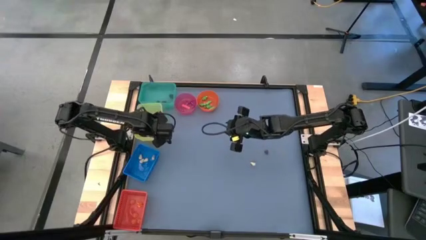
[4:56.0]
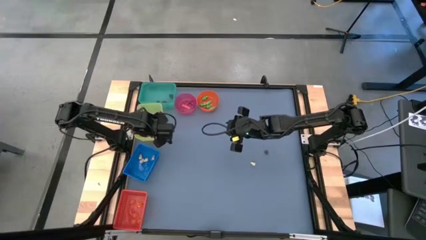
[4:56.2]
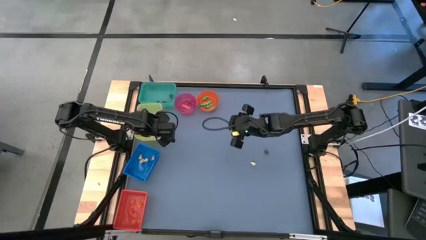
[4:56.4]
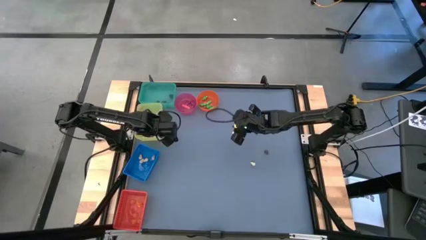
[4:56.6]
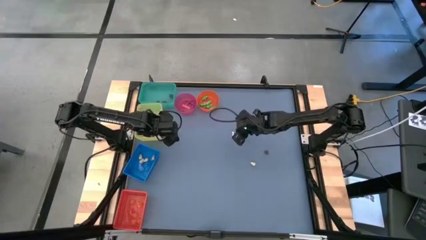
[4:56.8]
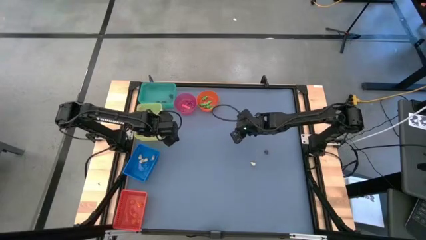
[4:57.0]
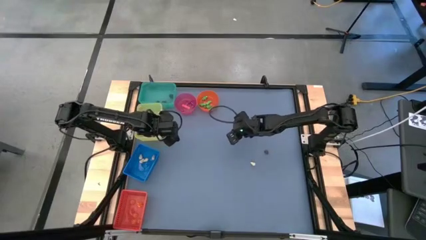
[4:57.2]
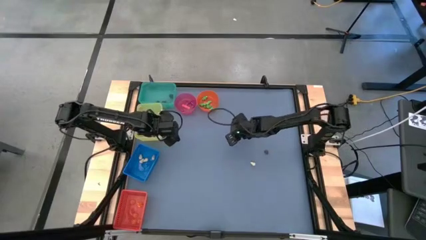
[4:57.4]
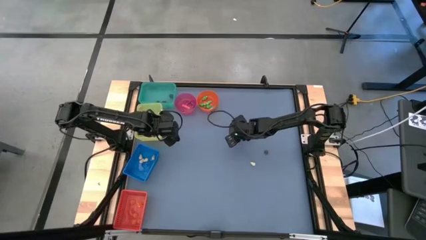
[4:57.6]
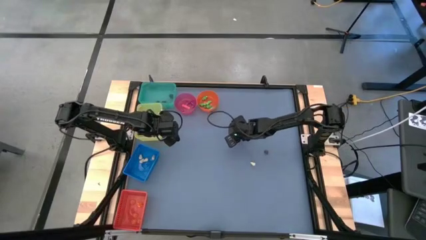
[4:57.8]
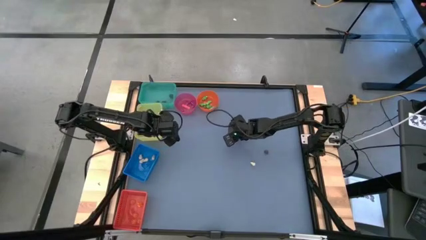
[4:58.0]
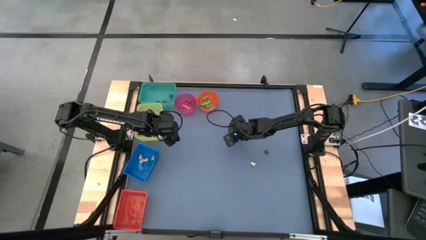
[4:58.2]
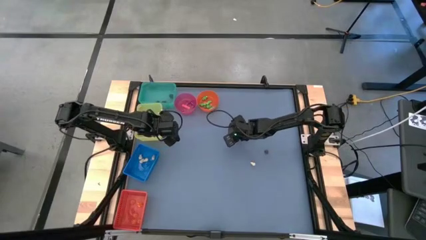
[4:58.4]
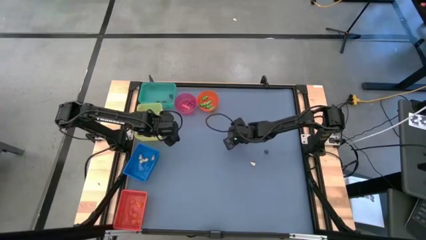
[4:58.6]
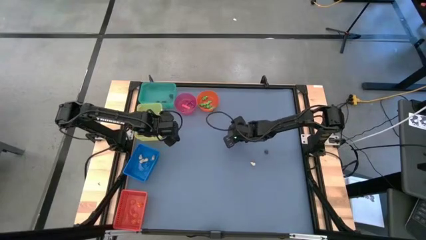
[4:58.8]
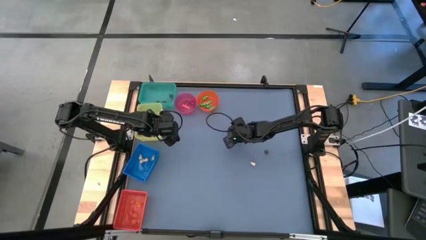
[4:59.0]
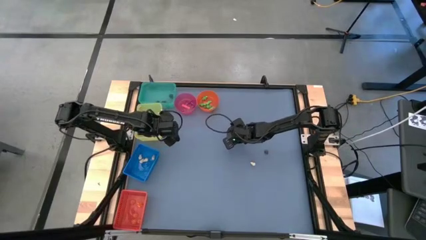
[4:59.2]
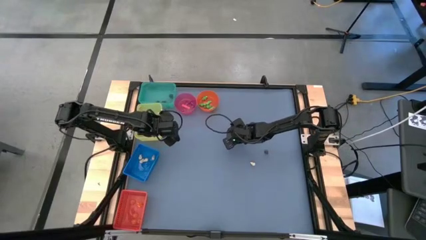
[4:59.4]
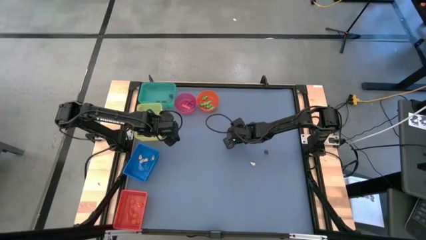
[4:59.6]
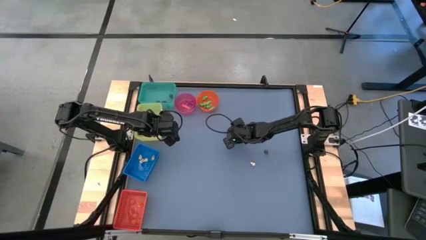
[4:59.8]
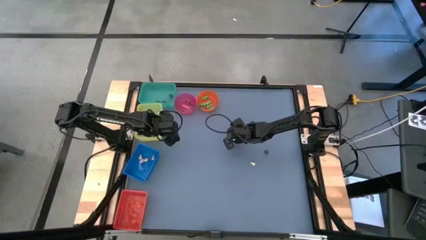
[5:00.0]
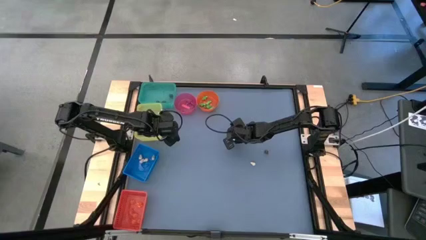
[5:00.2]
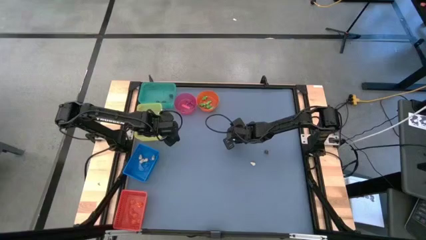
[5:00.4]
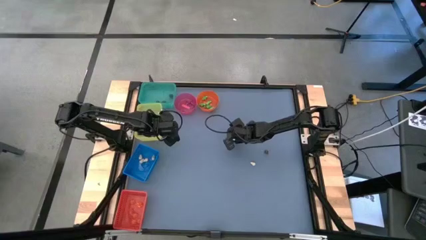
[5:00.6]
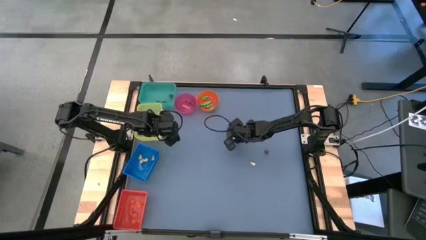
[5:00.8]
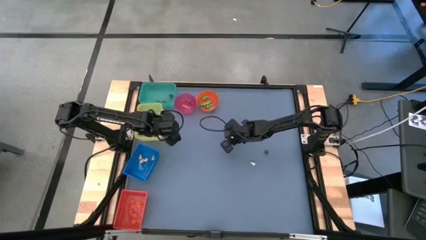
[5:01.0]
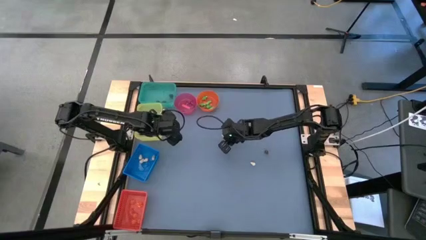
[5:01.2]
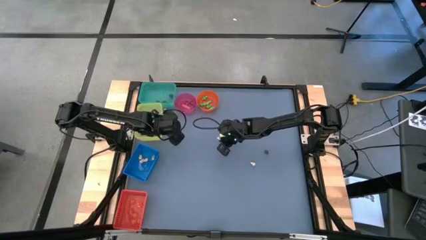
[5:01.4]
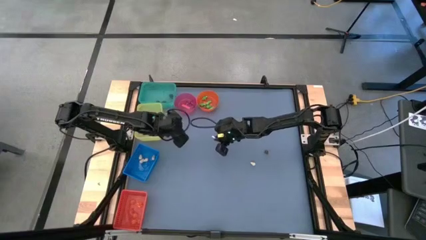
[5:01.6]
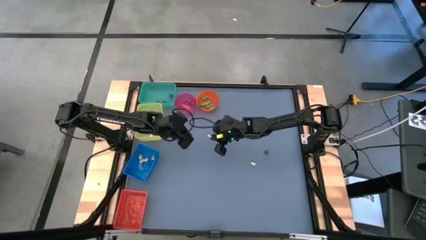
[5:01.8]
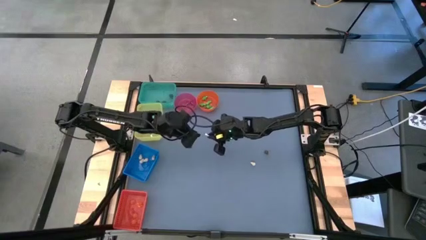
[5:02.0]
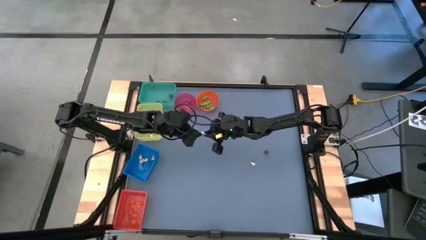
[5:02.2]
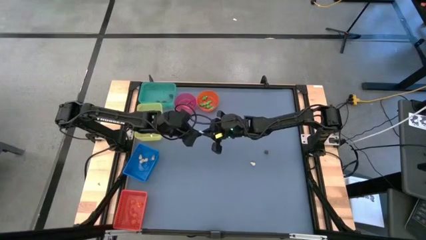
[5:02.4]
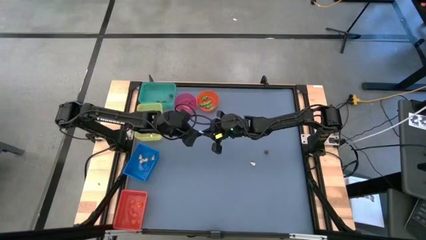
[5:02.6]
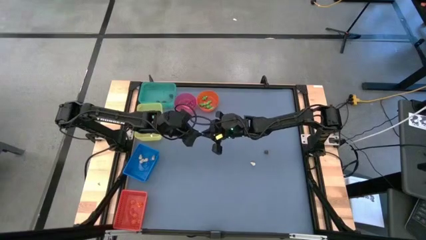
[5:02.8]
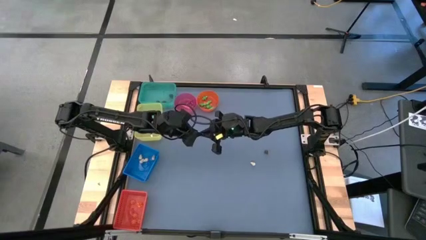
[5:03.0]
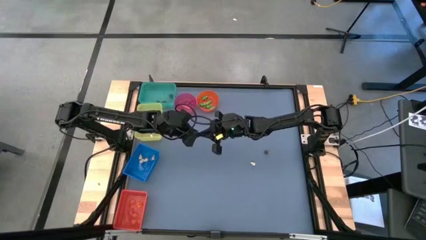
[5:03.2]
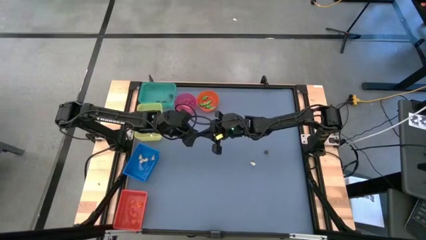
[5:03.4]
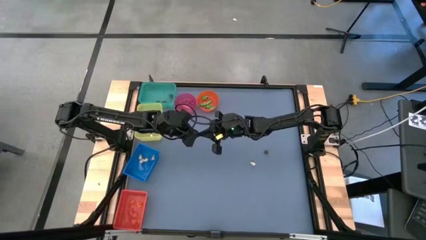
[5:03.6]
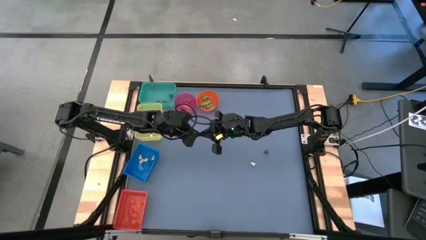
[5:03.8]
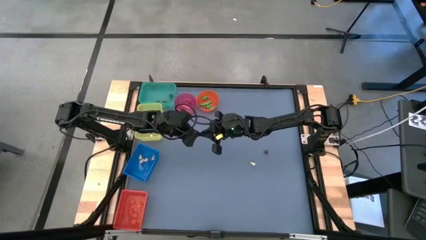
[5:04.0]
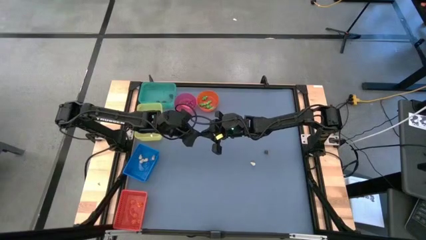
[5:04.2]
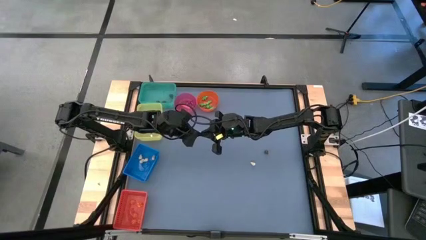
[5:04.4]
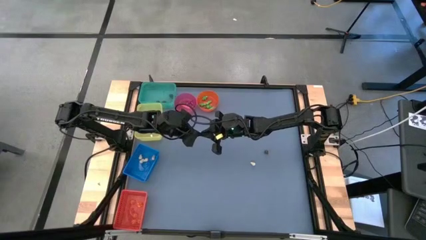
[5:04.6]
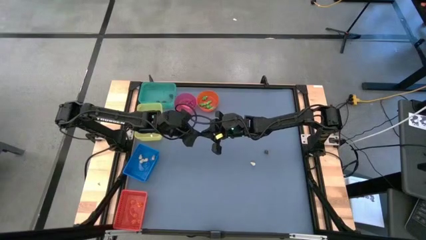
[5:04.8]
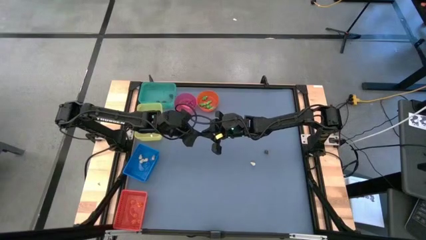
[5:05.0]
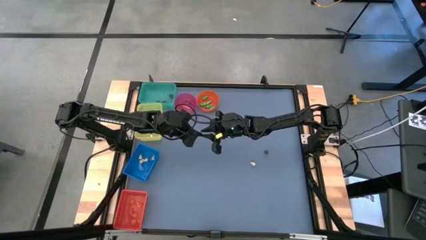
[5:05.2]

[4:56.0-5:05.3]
Task: Sort Halloween decoration
Put the white bone toy into the yellow bin

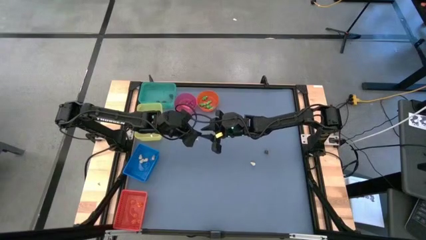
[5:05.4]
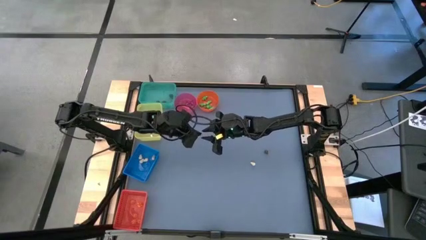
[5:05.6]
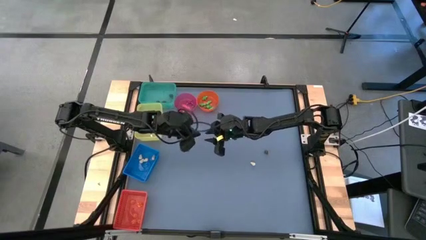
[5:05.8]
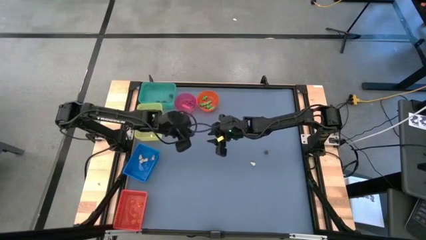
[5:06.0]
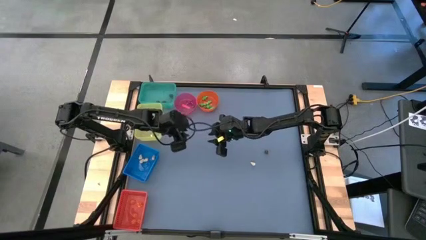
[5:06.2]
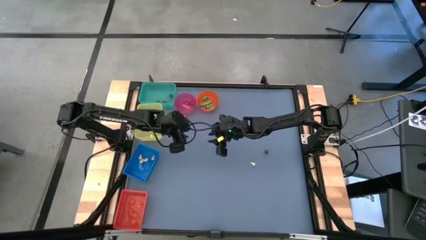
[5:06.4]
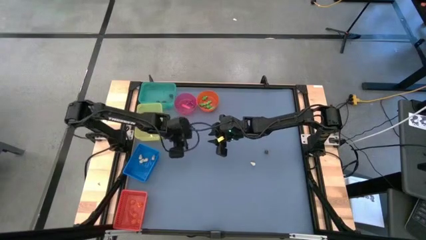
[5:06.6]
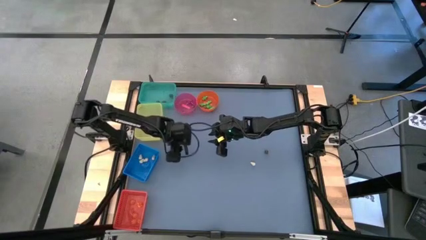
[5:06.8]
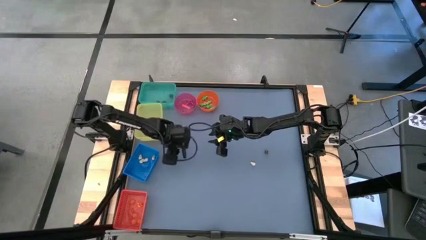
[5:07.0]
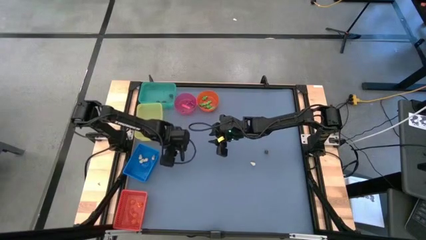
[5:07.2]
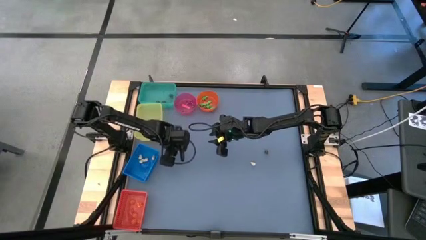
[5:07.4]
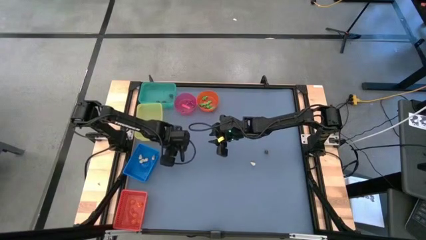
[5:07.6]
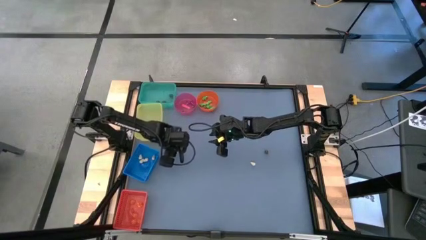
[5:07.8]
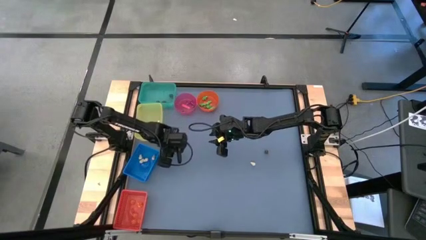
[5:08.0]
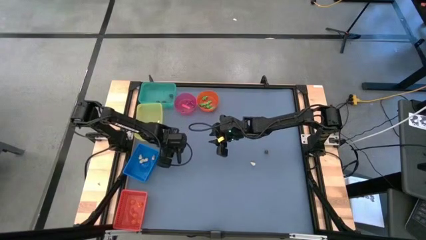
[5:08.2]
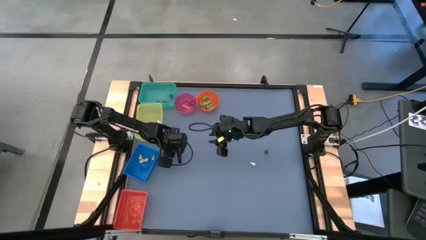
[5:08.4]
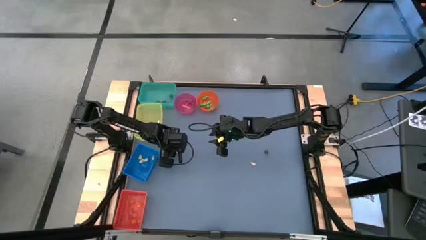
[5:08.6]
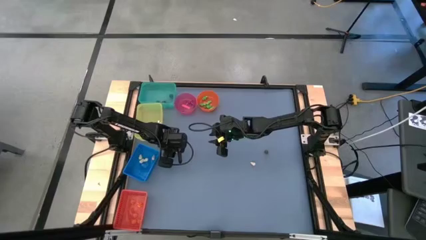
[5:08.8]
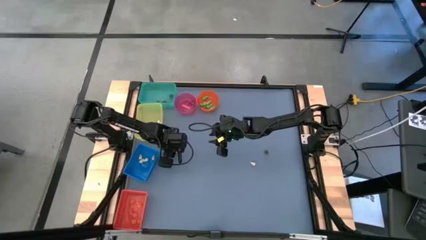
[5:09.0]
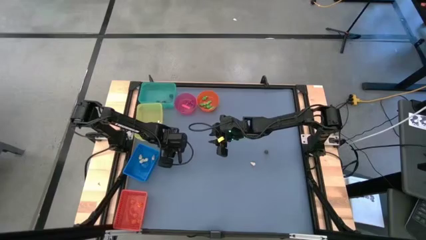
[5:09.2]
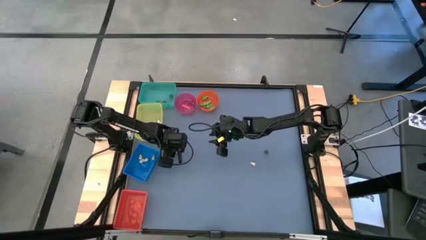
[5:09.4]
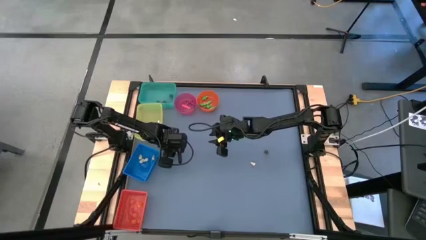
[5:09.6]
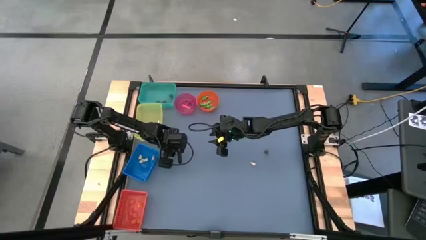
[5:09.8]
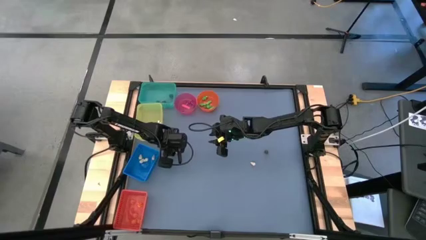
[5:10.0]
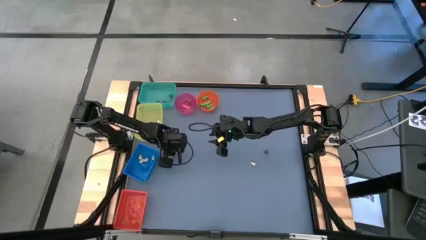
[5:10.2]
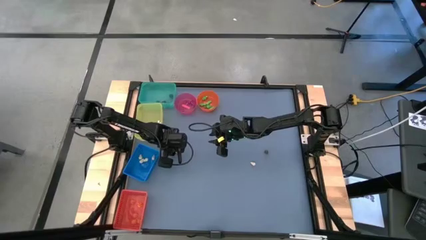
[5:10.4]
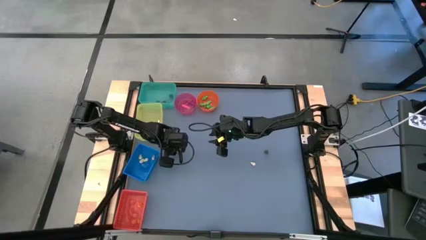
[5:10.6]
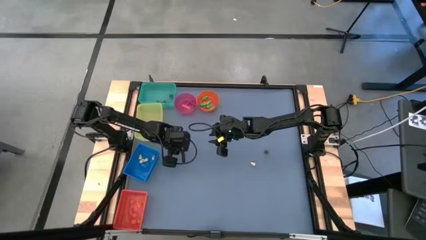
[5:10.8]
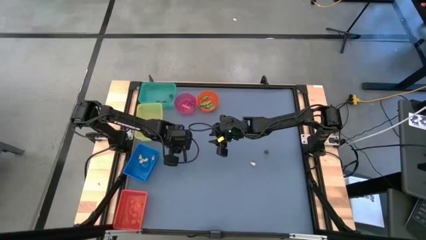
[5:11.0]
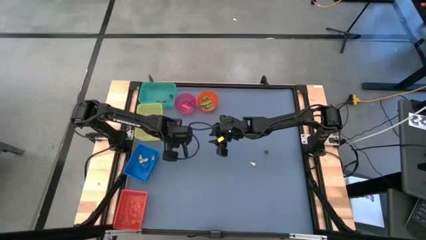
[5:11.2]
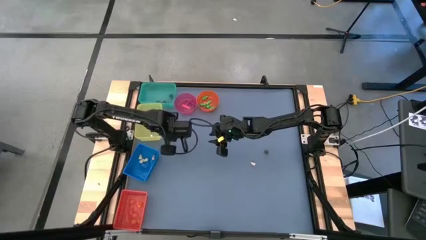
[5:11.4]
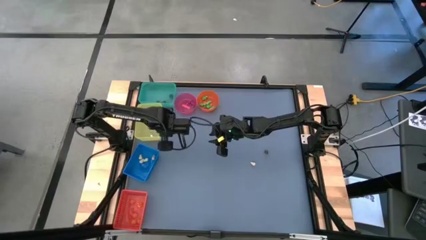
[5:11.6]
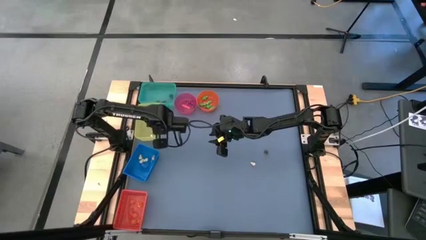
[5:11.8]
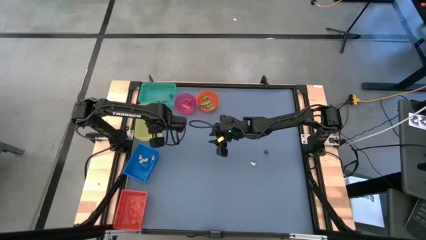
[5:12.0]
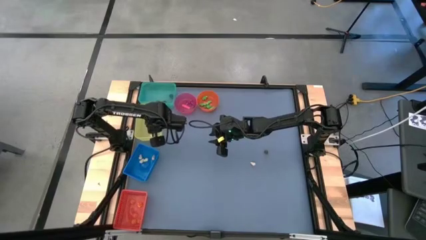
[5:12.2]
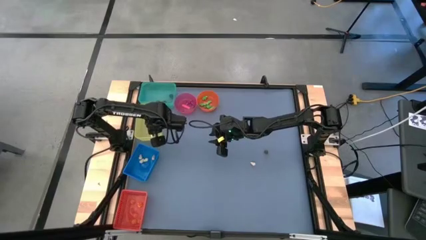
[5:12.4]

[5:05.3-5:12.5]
Put the white bone toy into the yellow bin
